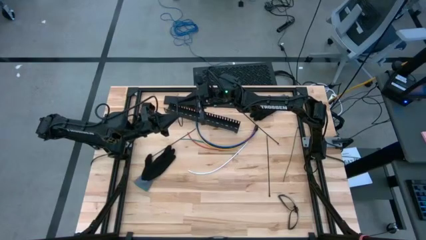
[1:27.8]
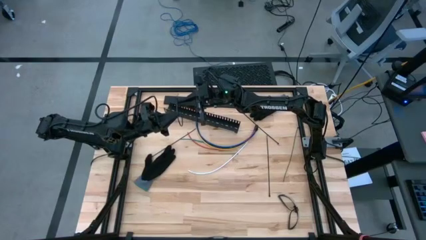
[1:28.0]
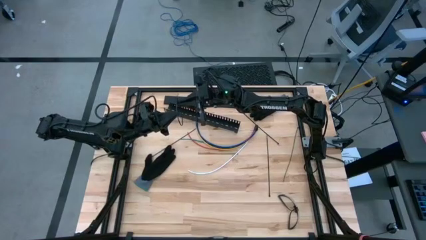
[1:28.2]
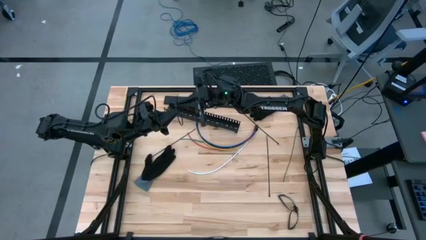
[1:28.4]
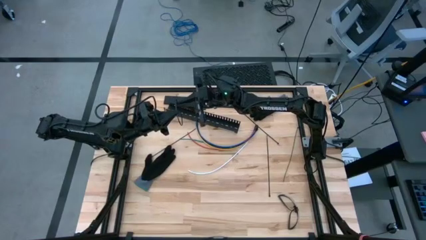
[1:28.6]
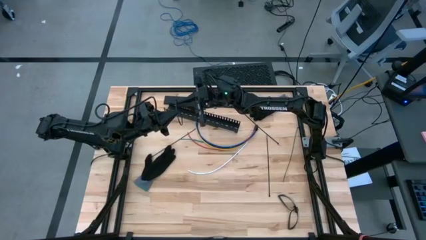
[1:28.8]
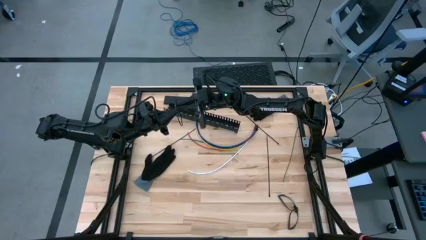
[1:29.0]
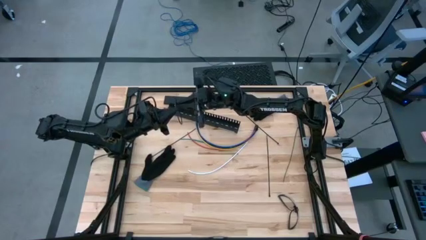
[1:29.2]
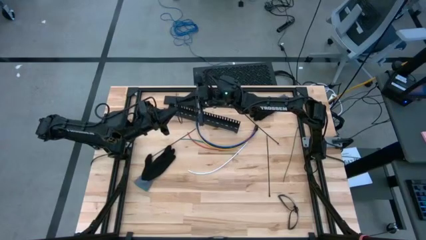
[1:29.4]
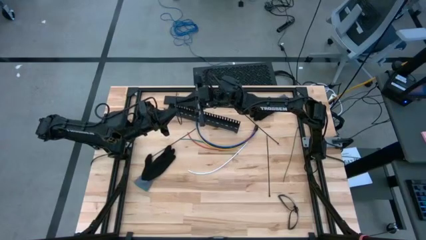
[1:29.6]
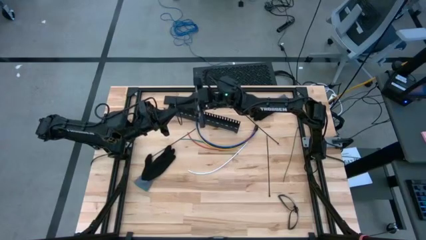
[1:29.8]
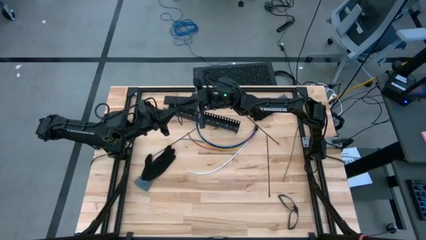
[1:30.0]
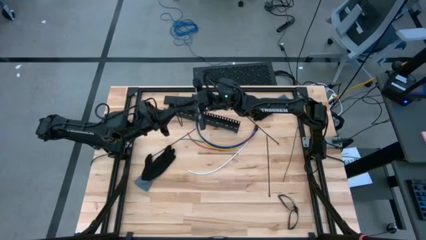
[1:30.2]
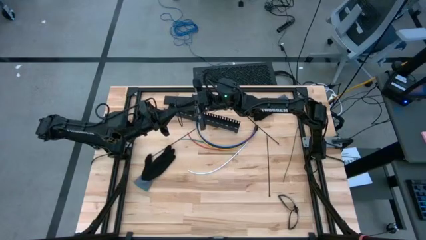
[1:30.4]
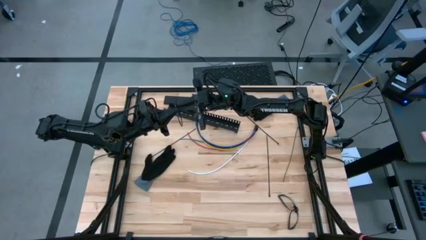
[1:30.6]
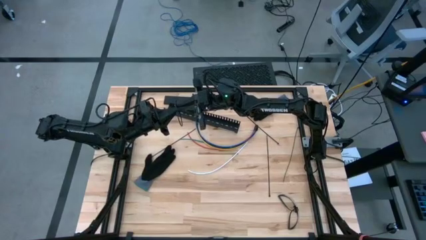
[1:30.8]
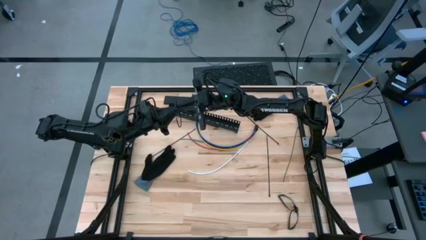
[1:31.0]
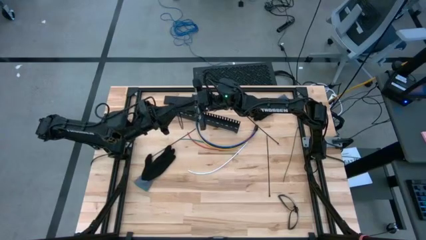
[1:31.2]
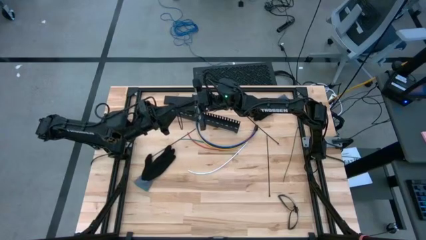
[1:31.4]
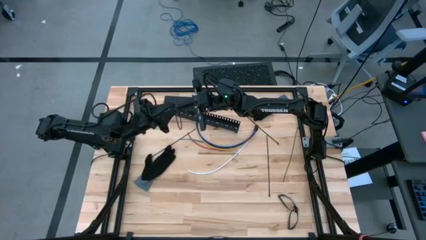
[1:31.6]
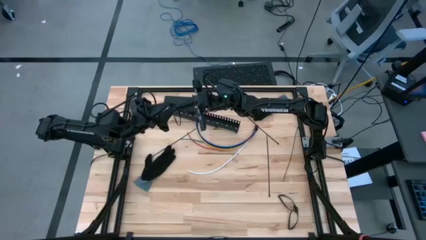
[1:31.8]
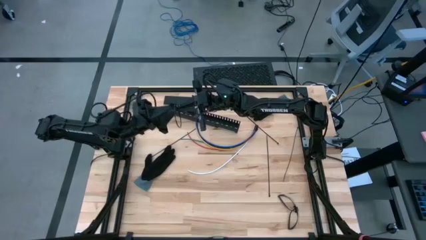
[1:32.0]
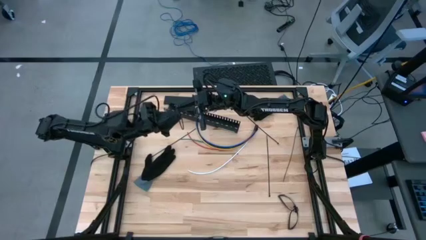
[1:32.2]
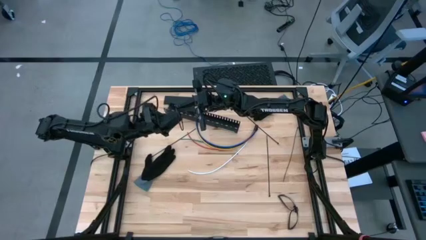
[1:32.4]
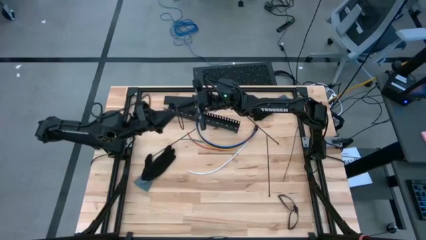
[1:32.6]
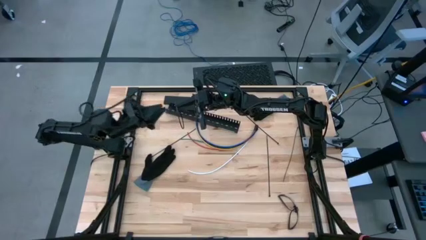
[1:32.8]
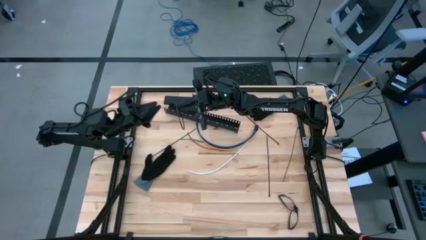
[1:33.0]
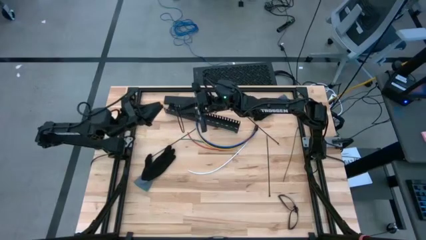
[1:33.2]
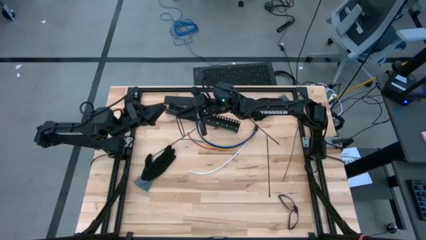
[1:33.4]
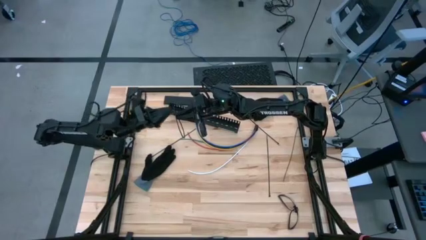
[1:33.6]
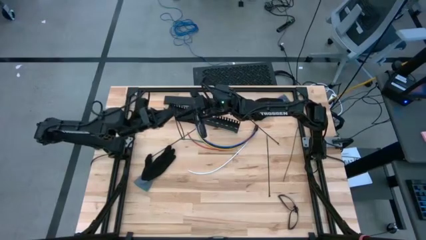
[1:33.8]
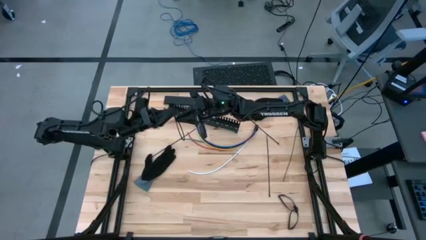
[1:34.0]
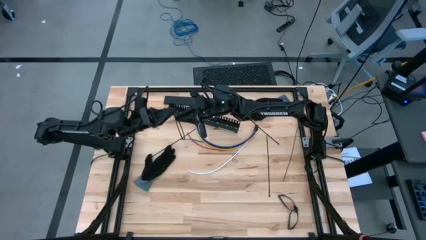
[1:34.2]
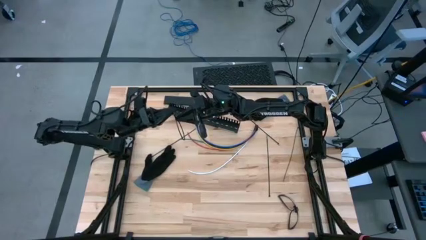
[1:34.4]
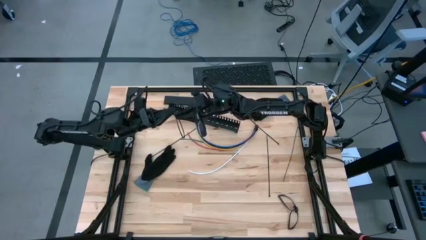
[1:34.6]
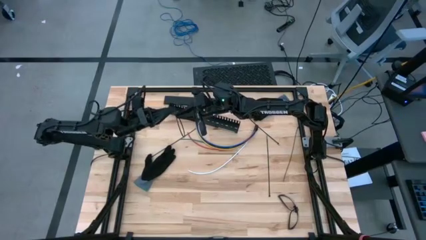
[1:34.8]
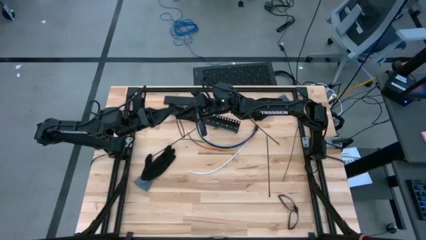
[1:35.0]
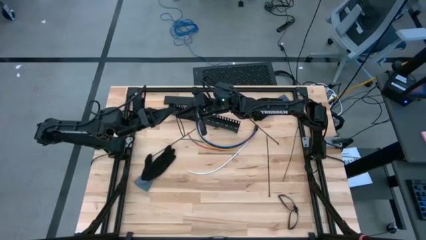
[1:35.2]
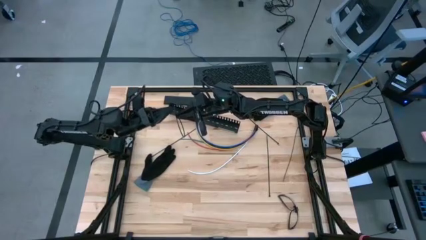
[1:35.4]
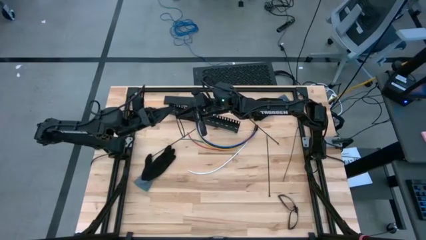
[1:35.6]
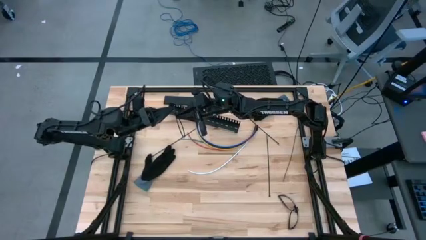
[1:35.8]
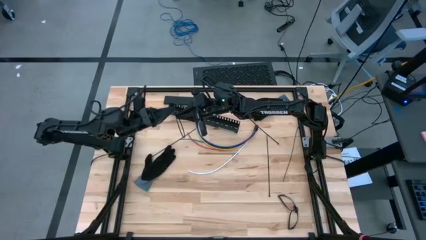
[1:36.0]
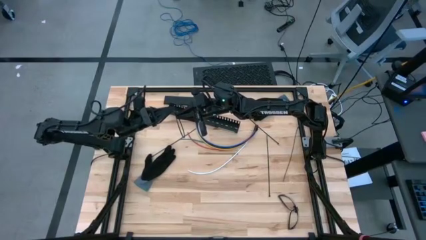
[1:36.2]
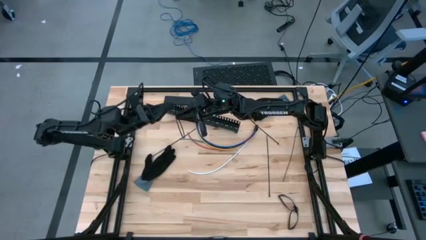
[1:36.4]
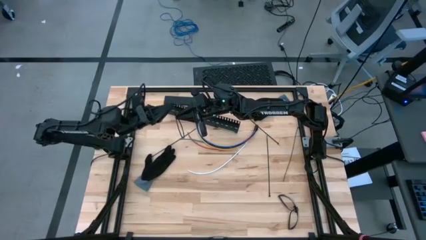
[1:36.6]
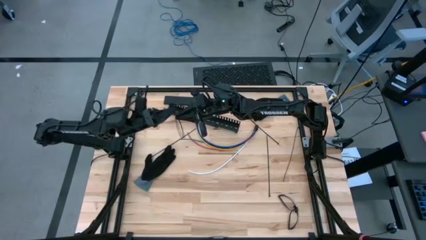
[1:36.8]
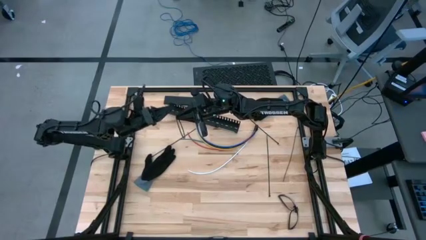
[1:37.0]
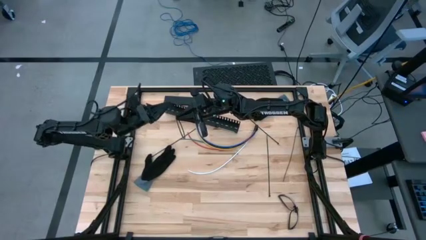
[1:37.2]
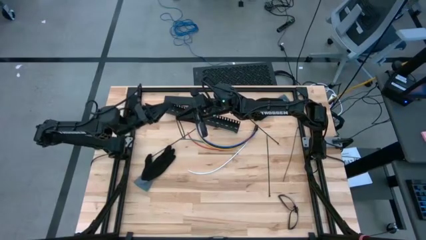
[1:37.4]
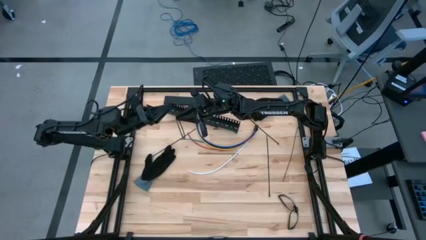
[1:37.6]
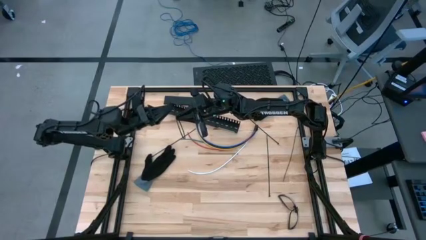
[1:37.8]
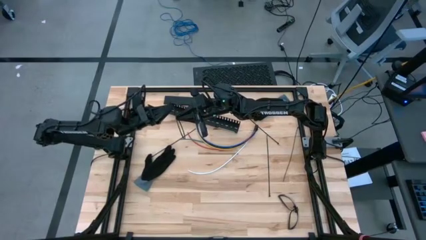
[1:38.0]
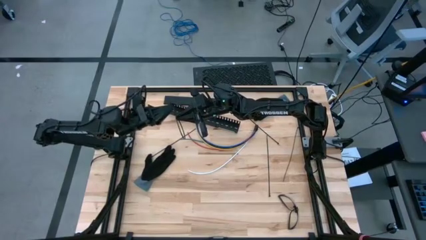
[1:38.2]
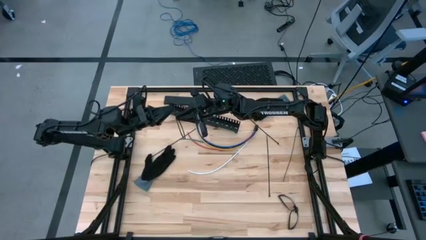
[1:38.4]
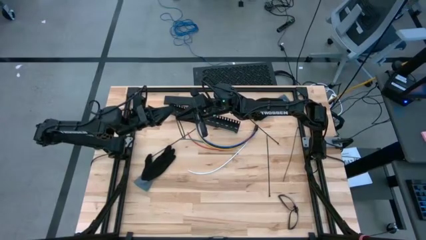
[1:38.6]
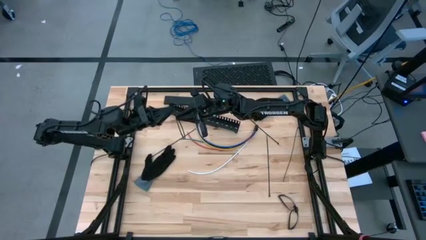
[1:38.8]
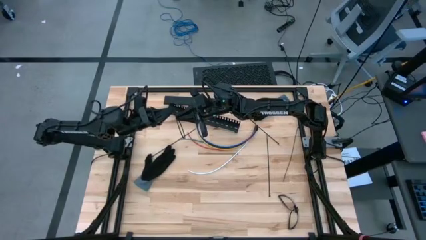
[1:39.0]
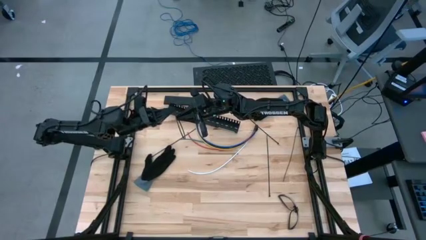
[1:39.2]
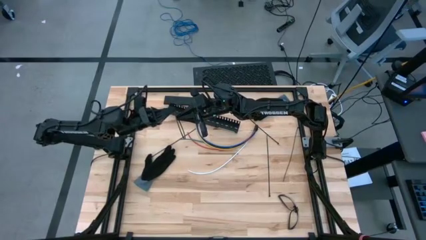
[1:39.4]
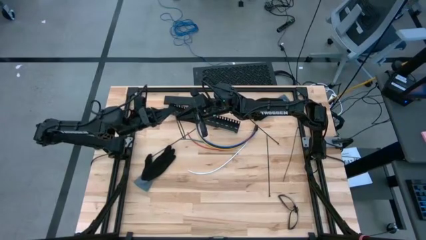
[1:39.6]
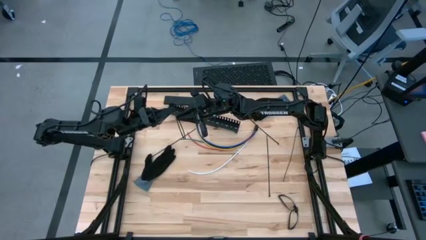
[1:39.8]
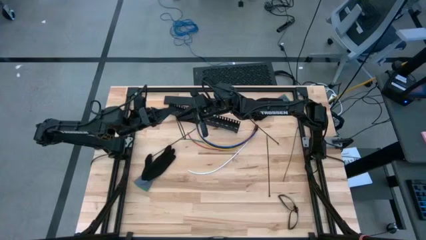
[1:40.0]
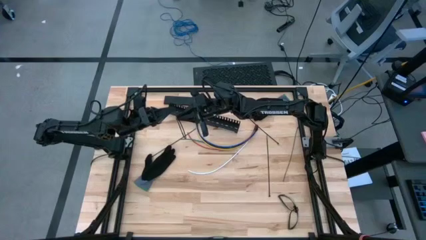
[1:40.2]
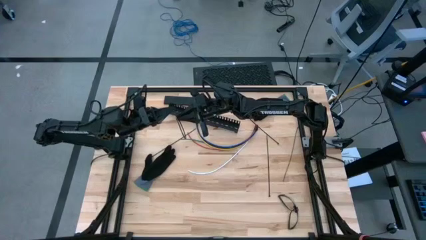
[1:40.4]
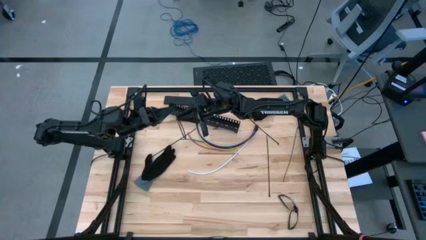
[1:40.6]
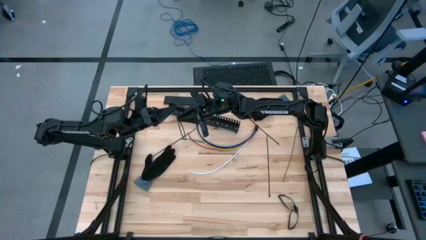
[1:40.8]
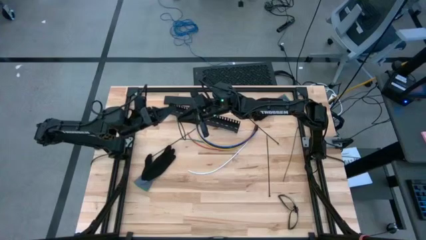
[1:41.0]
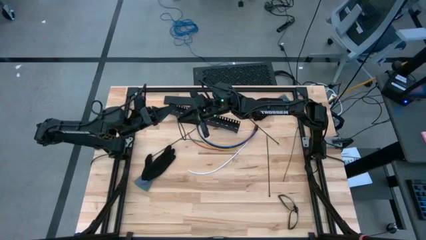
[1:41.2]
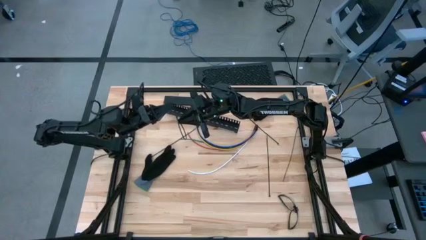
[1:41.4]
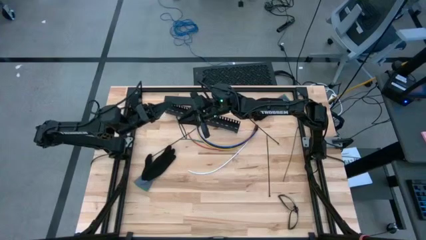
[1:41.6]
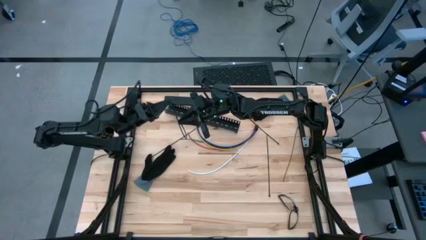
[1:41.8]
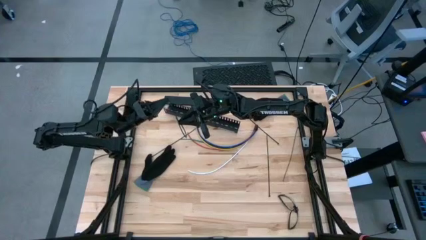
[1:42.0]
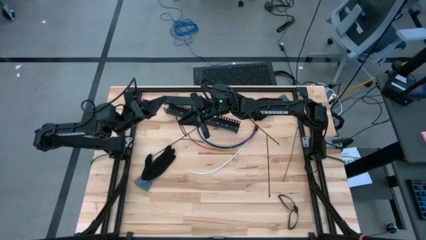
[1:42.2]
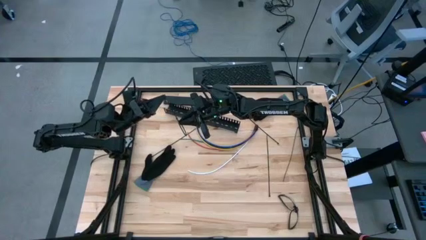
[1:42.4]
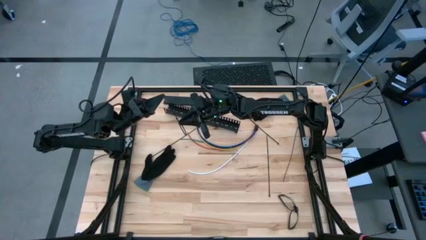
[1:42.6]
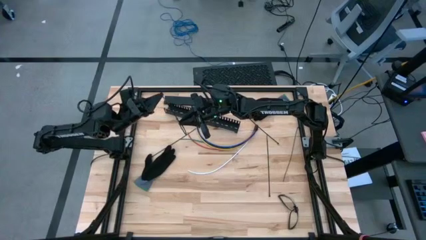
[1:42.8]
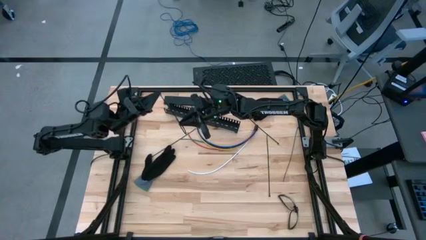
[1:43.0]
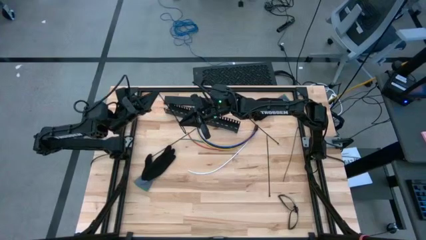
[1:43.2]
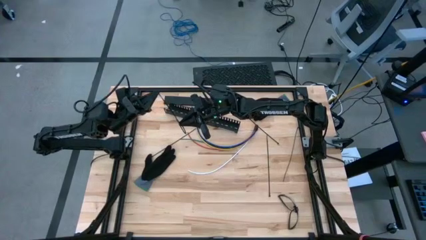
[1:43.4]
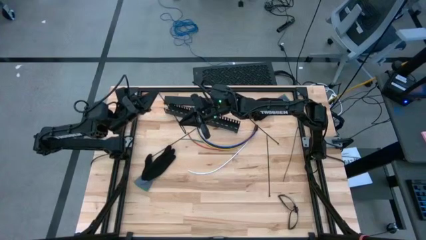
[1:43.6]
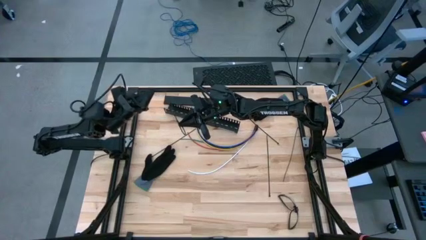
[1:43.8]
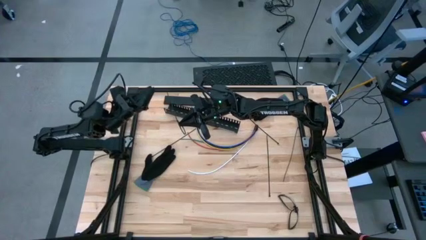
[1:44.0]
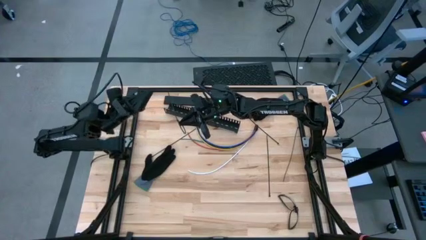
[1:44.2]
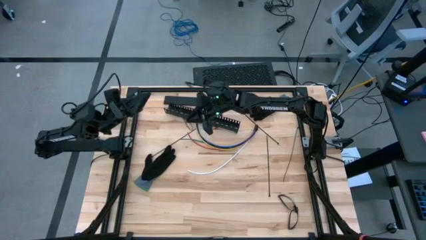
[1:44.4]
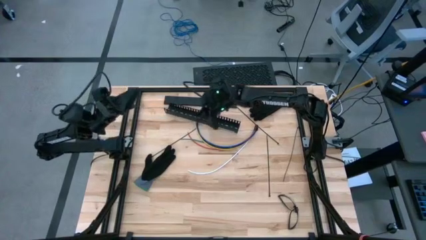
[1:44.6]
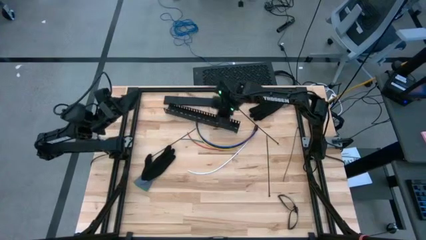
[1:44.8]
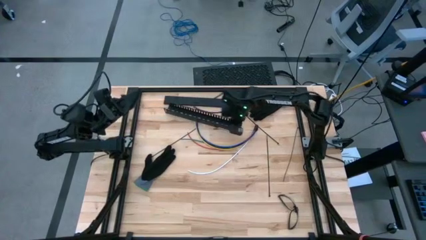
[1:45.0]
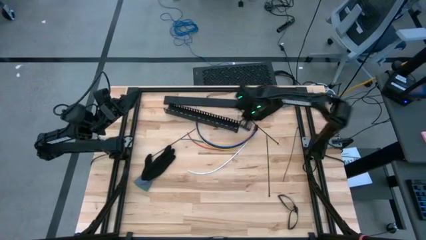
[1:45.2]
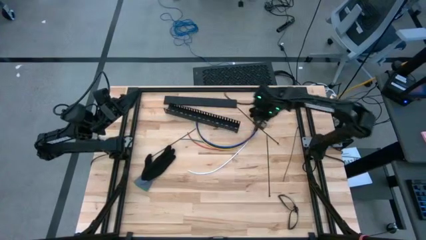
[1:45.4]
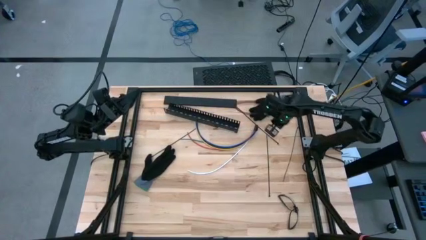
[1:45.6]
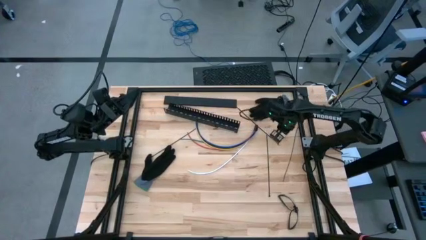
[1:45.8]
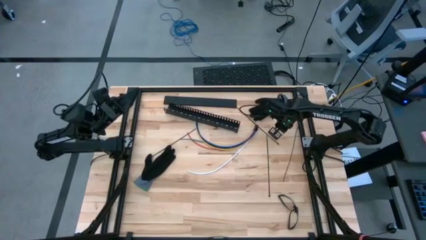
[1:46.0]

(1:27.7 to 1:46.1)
Task: Ziptie cables
Prepare the zip tie
